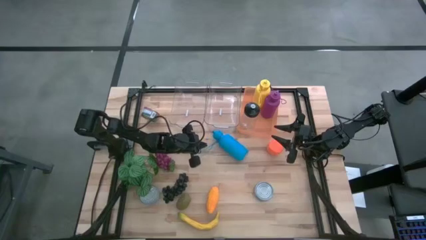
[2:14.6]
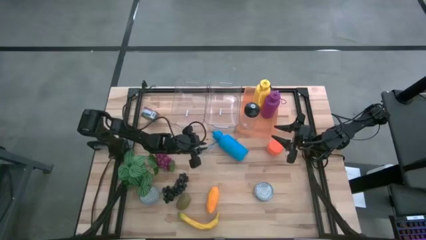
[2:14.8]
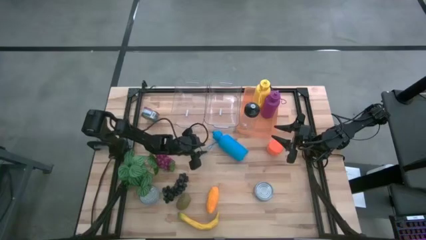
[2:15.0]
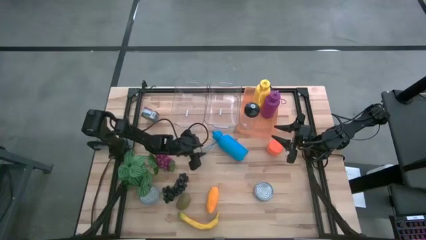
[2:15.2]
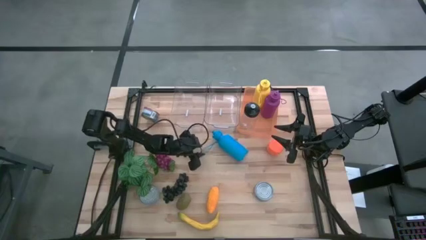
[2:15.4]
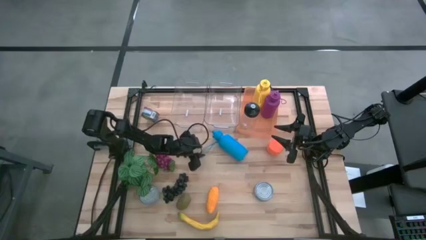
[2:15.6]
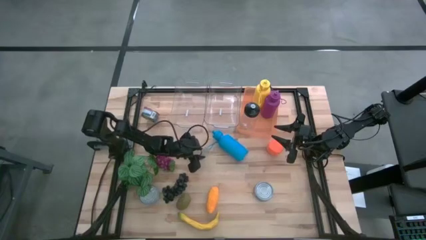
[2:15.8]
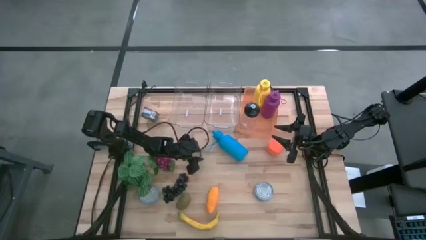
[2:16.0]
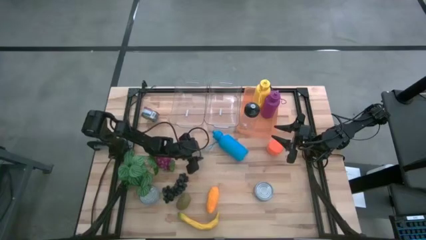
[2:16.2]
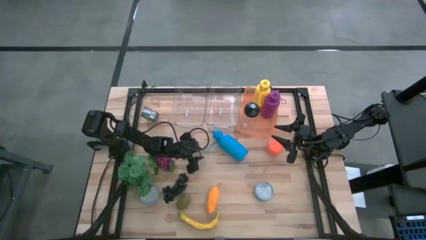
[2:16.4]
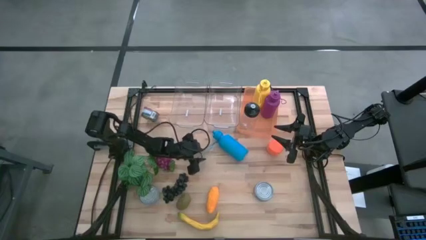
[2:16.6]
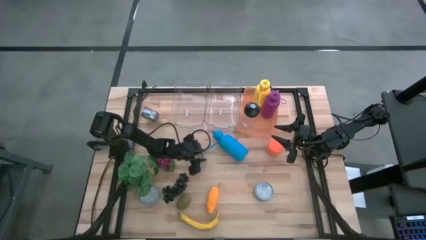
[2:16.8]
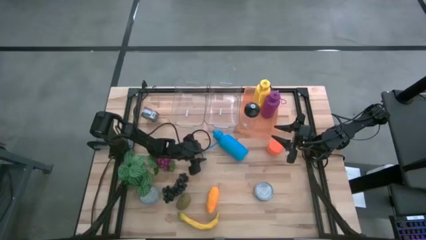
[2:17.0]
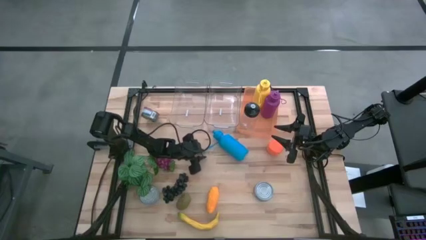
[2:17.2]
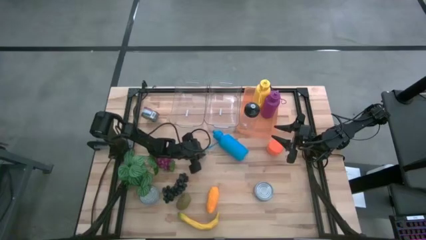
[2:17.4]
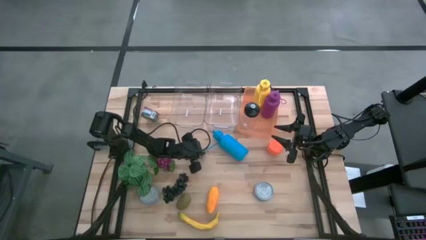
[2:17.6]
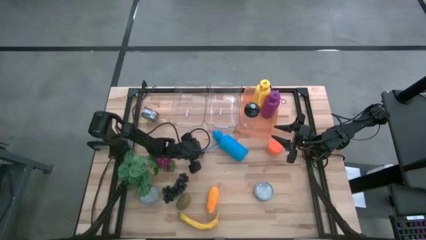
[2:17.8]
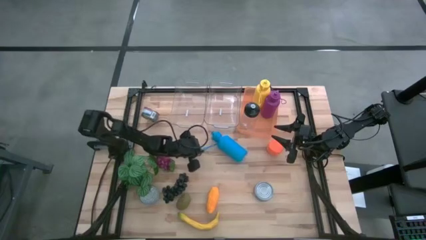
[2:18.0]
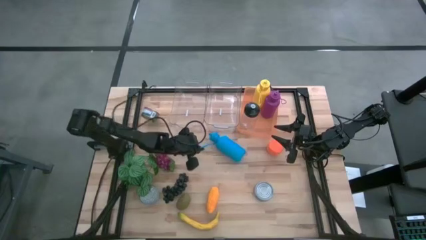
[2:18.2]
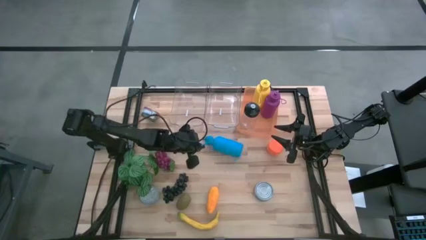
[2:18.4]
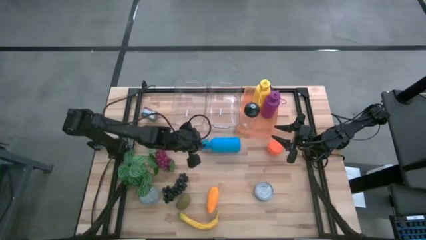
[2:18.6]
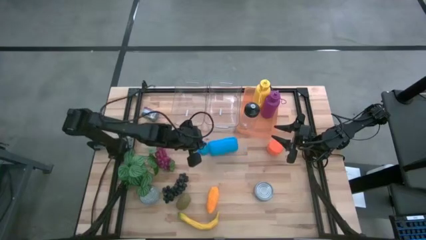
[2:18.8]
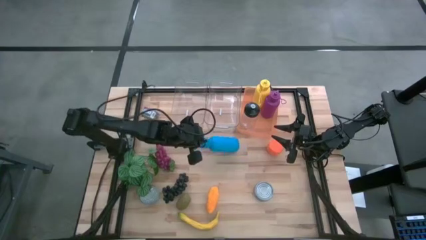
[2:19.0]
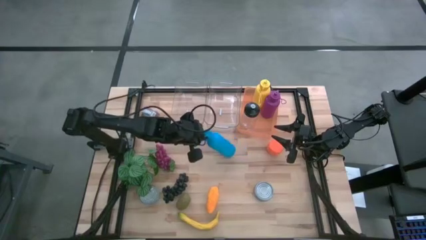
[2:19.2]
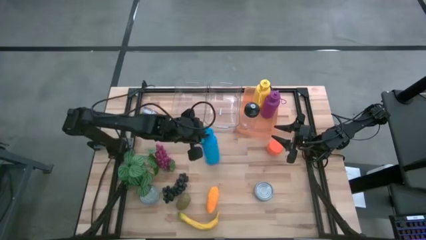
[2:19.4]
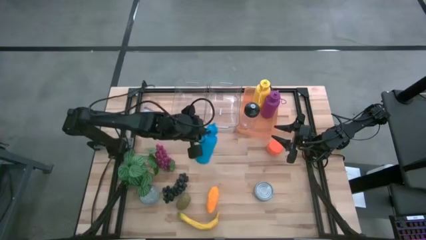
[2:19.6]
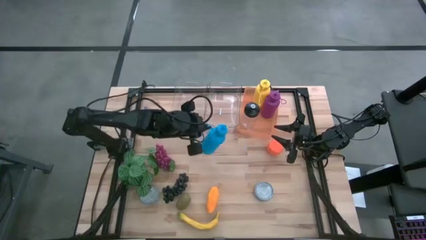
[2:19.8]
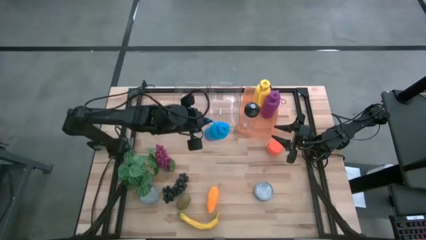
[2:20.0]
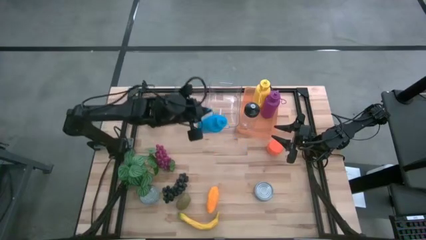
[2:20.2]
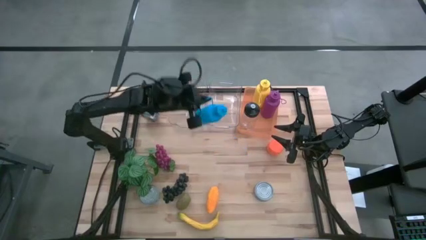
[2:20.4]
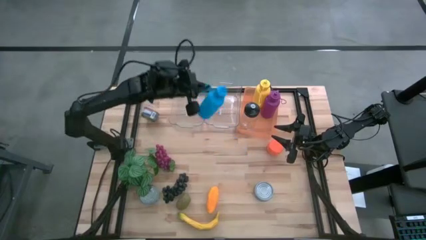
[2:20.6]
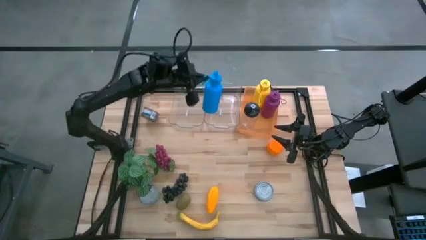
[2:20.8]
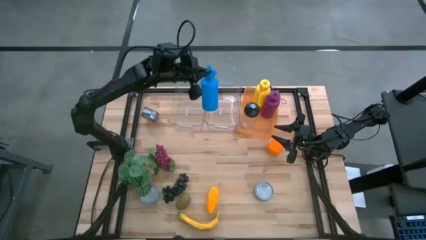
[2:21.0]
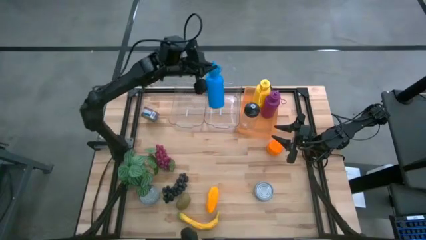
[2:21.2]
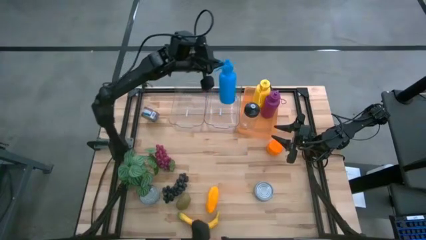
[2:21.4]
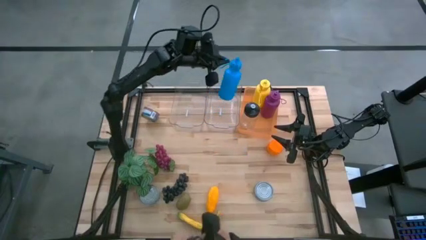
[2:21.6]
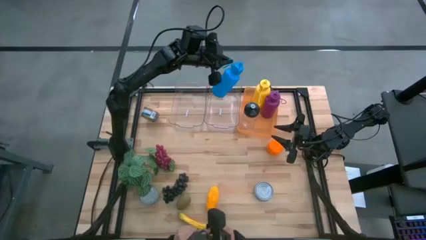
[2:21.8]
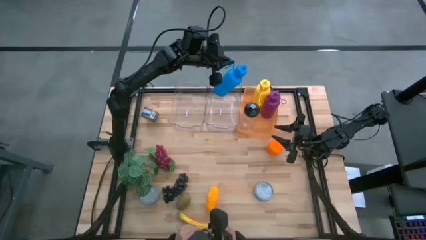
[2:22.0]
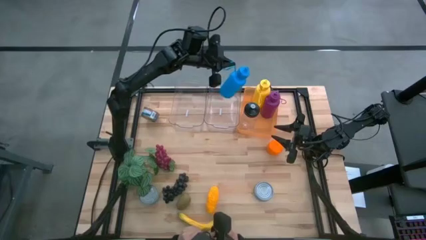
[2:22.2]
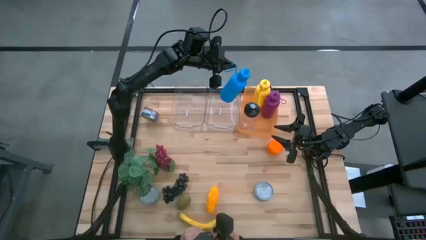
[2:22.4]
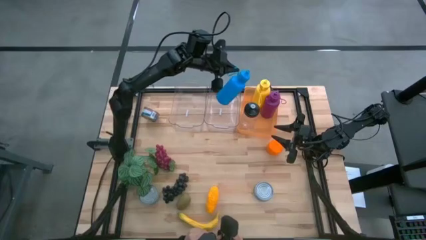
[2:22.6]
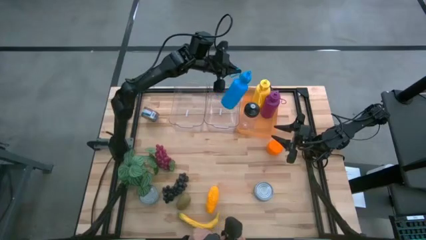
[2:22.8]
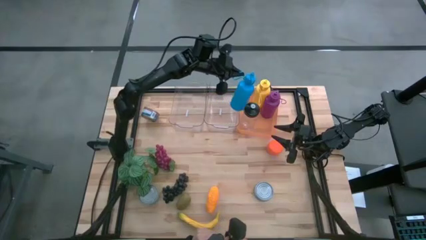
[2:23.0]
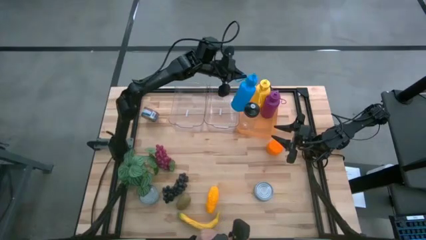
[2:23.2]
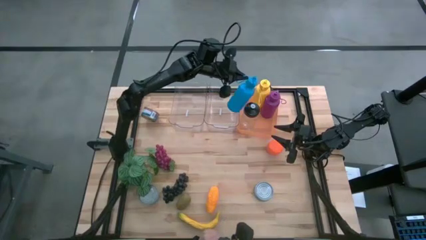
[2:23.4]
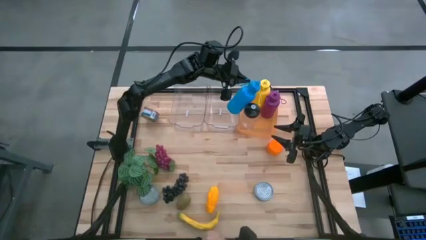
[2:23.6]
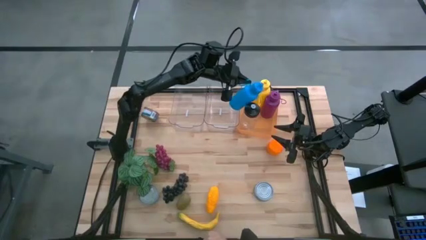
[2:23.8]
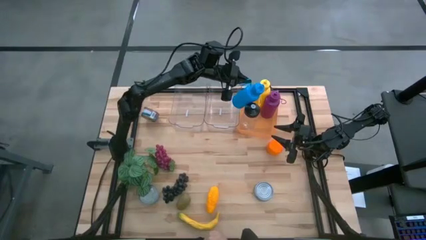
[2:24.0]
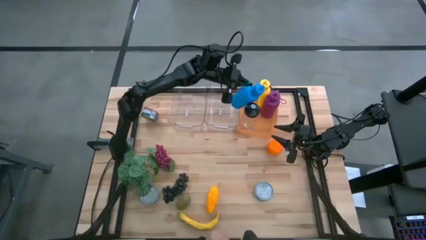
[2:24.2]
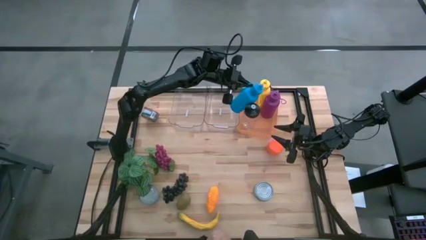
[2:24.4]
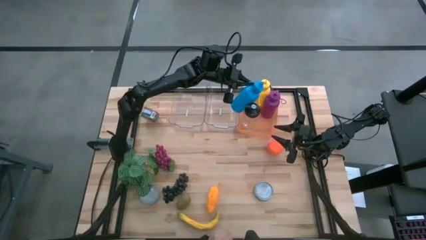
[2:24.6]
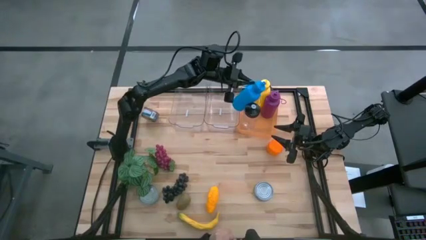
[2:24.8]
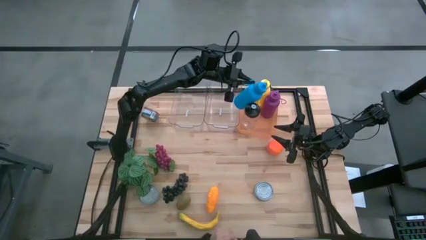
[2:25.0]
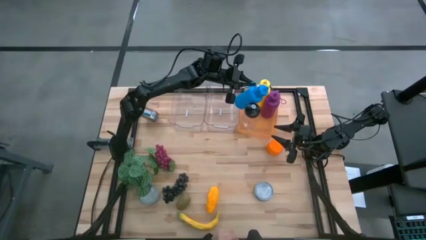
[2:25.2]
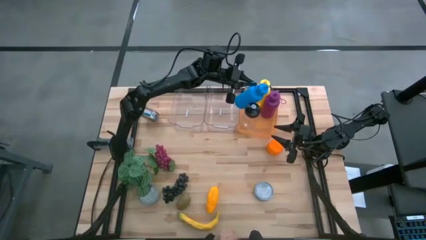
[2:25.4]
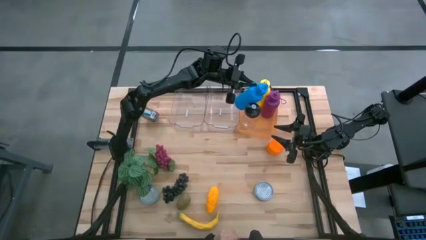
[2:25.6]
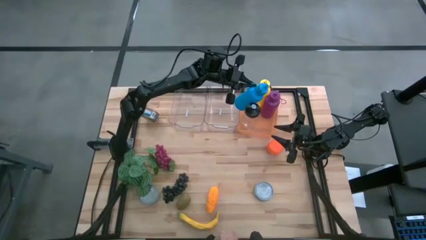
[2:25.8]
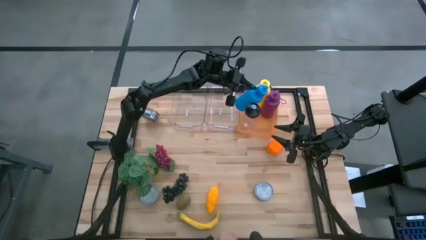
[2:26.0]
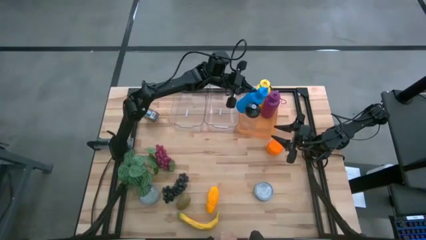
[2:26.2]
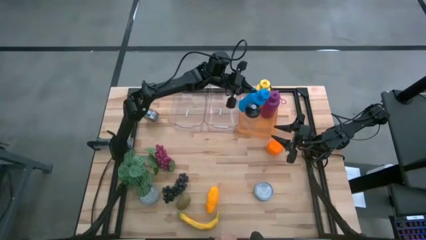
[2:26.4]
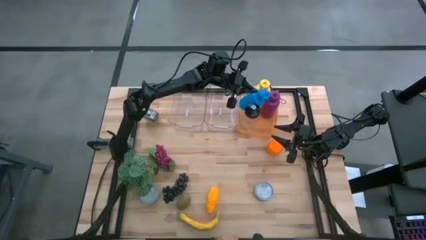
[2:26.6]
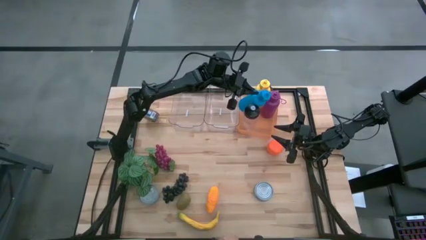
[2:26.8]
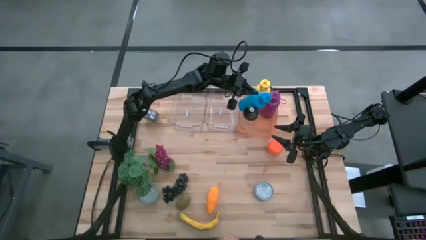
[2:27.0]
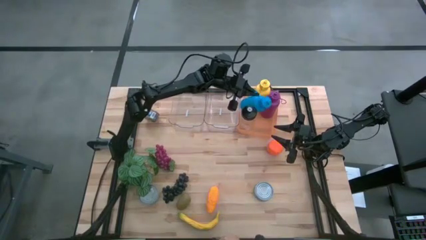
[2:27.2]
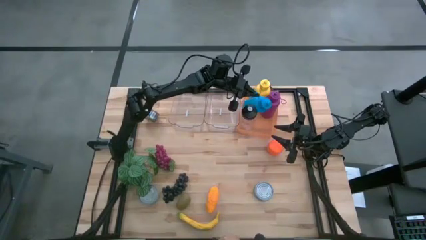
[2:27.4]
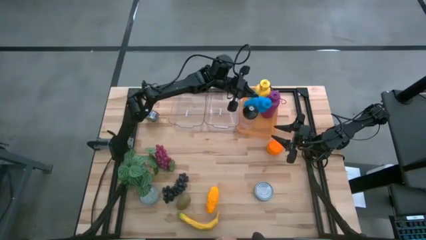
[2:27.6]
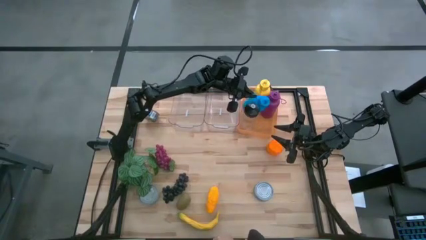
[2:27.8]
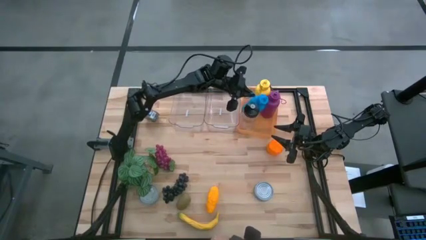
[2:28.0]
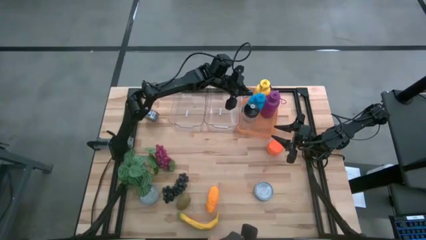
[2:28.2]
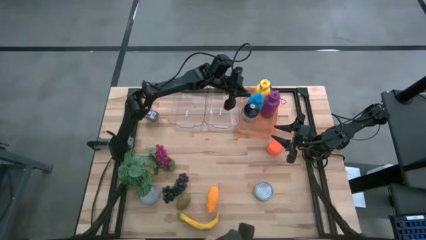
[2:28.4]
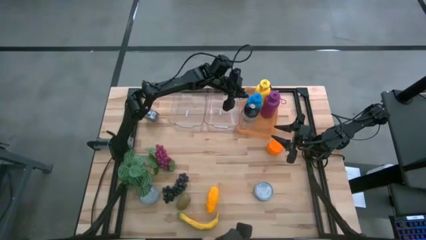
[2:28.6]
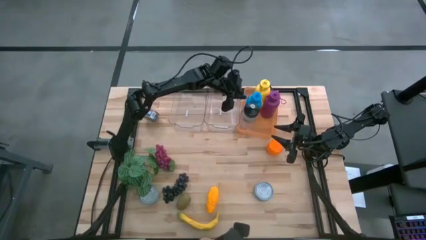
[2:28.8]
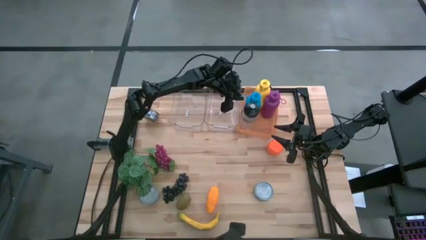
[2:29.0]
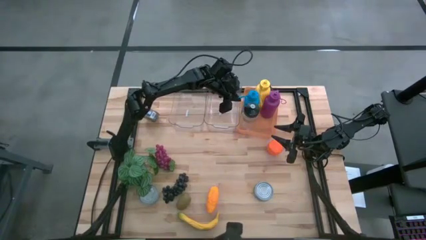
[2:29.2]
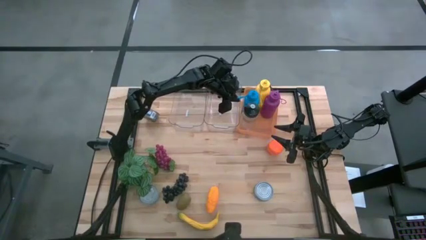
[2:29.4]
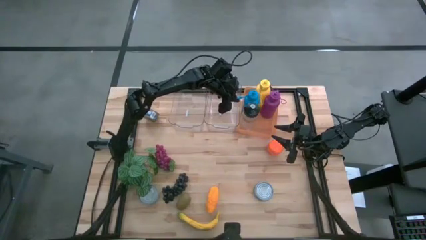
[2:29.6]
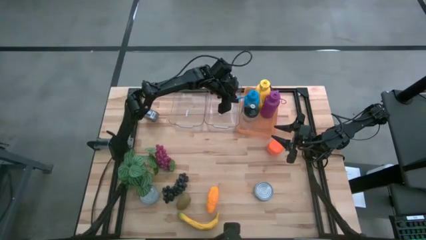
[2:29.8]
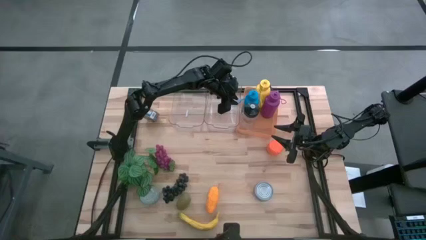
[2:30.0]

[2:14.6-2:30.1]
Task: Pick & Place Food Item
Put the blue water bottle into the orange bin
